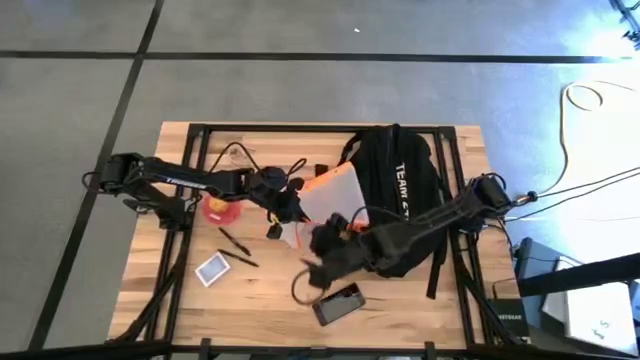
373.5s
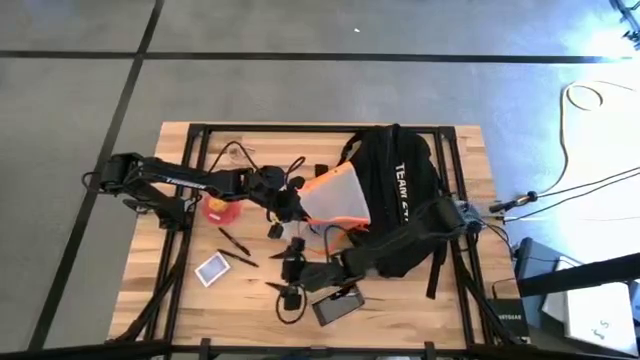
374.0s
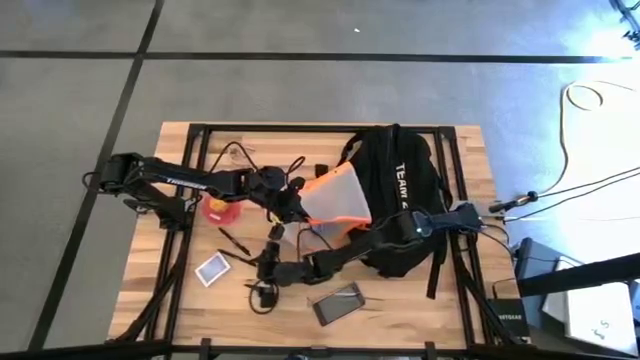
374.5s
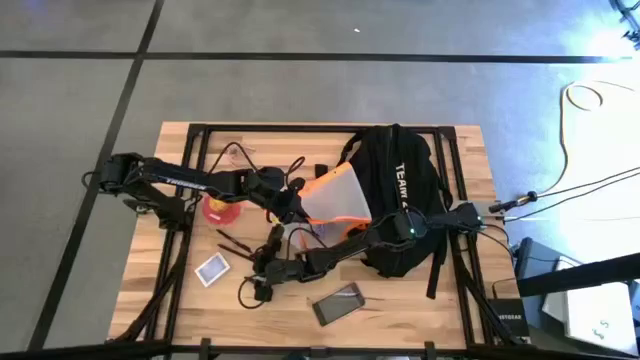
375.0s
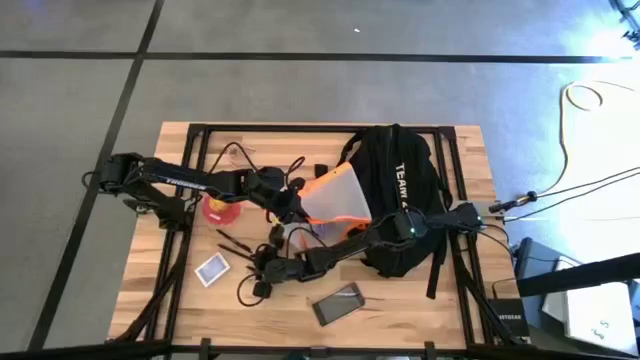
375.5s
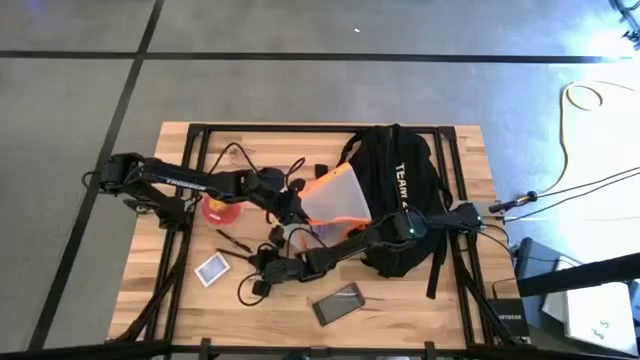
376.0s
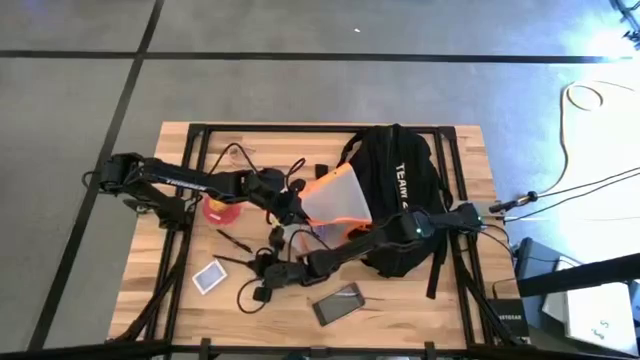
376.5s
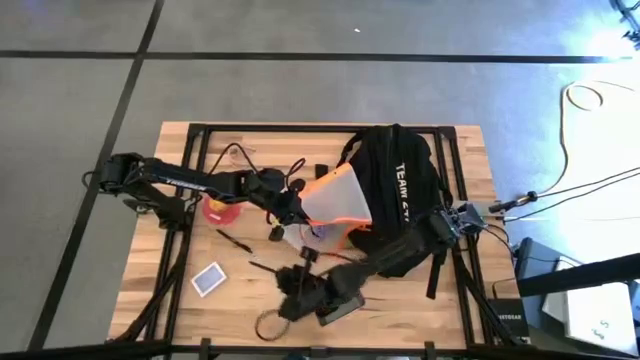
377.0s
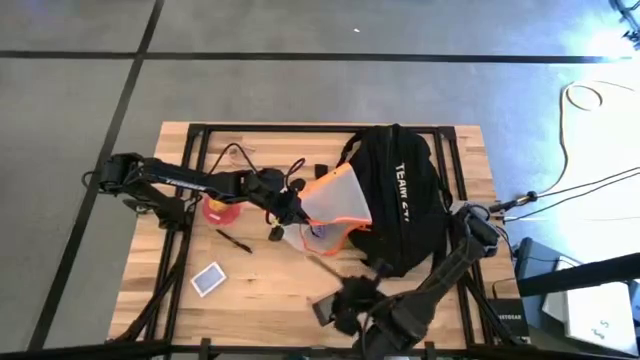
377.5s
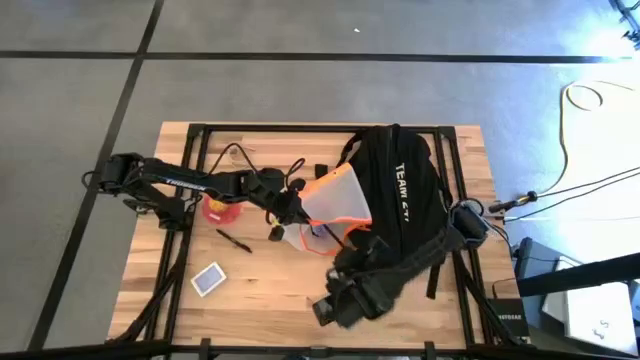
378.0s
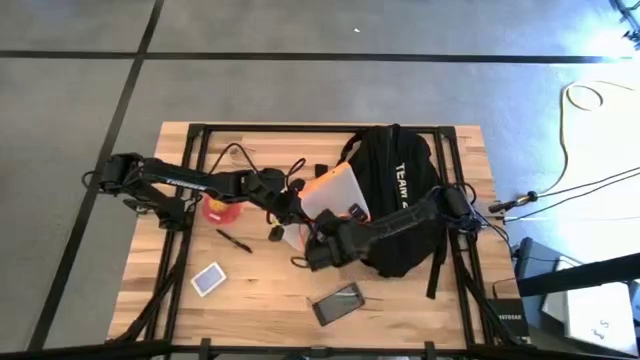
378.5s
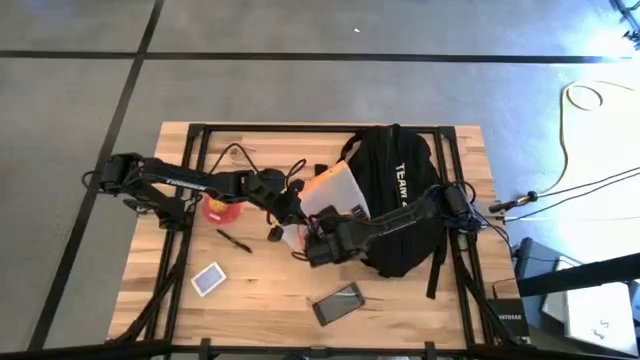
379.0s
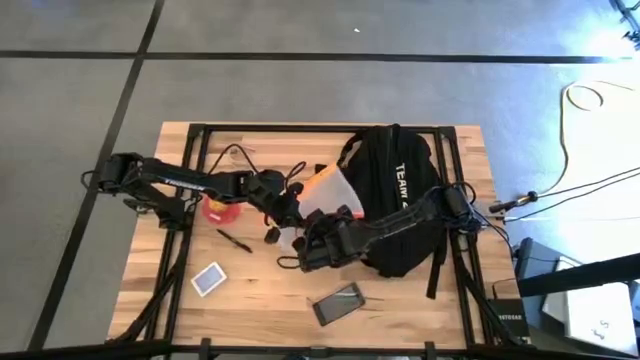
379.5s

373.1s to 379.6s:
Task: Unpack backpack
Put the bottom black pen into the transparent white zip bag

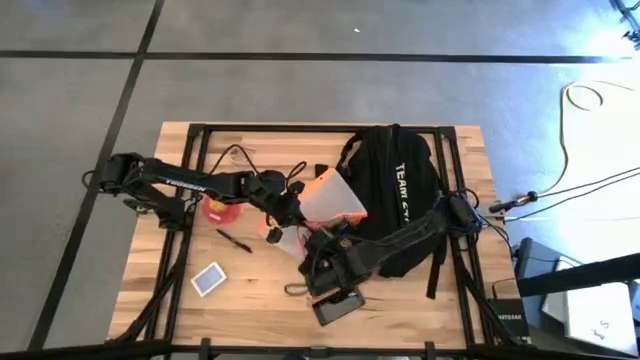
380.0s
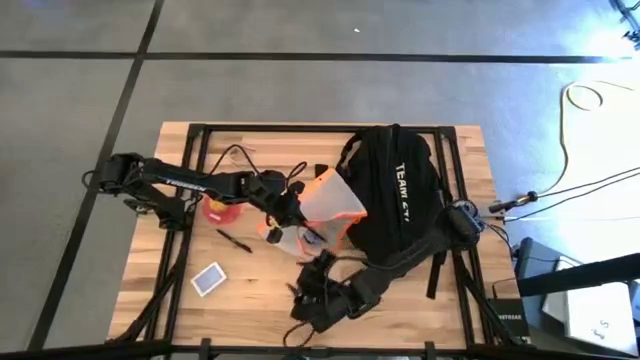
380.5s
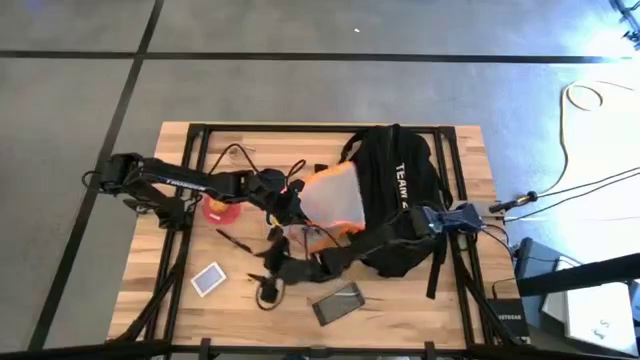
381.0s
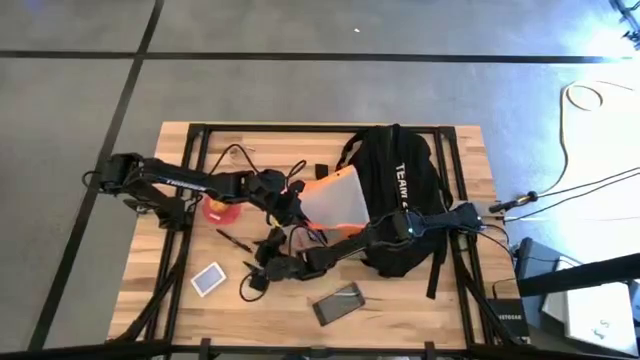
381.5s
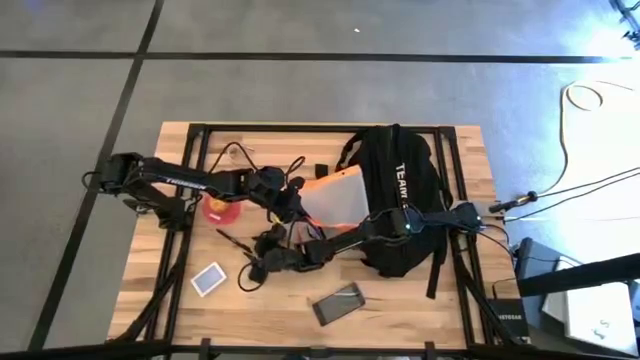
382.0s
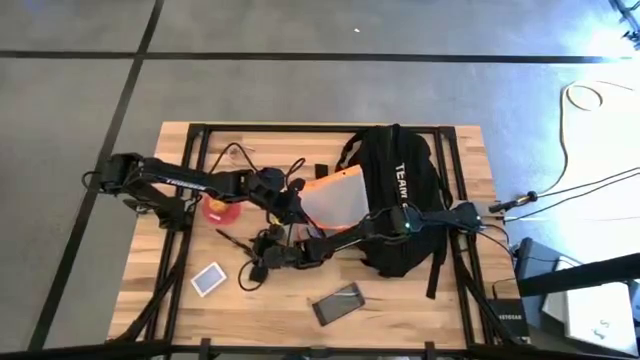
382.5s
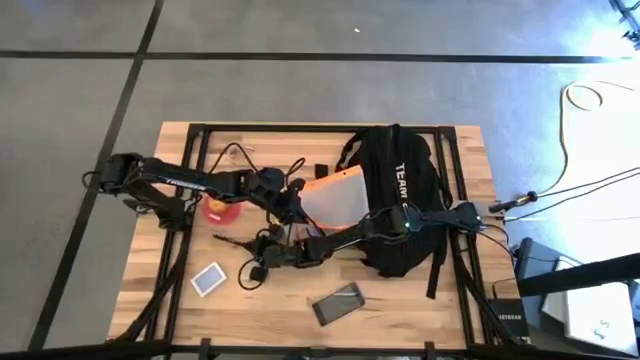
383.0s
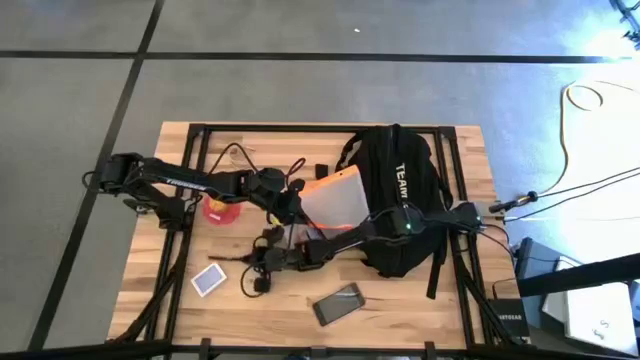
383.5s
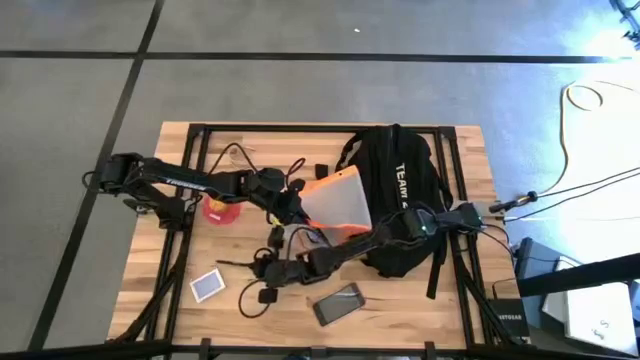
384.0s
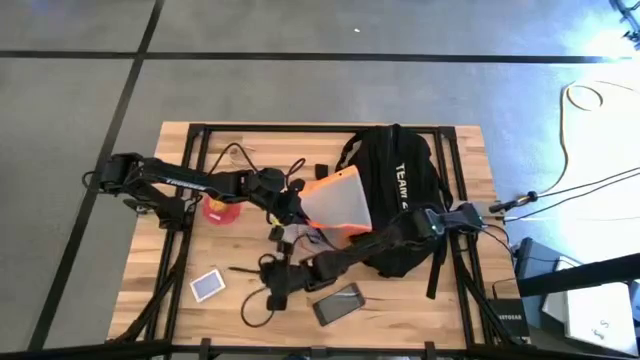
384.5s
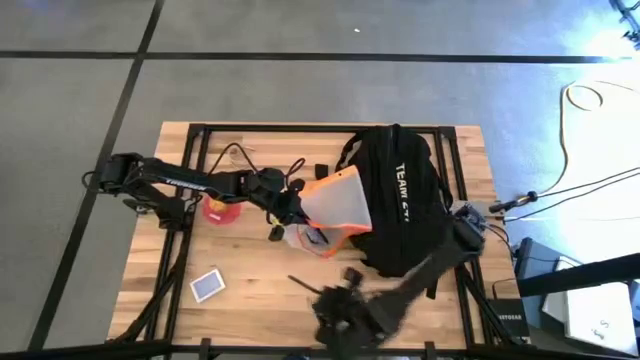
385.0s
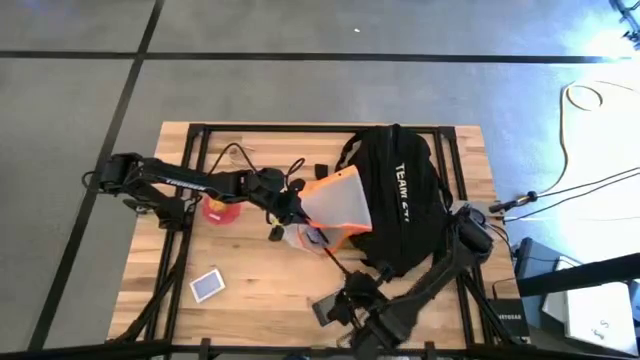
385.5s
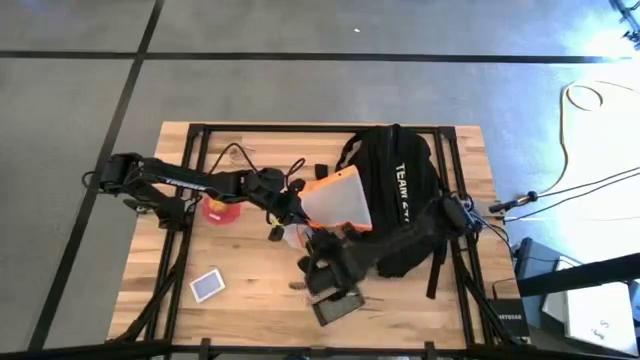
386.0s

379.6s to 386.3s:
Put the black pen into the transparent white zip bag

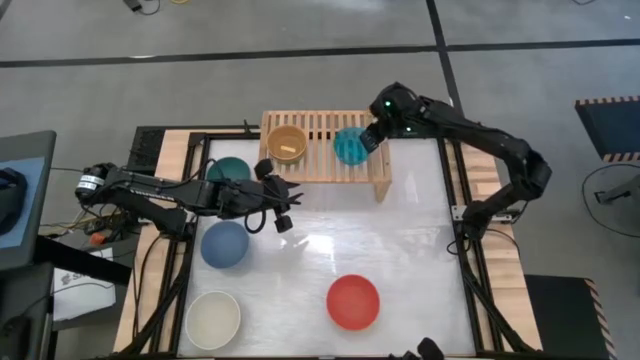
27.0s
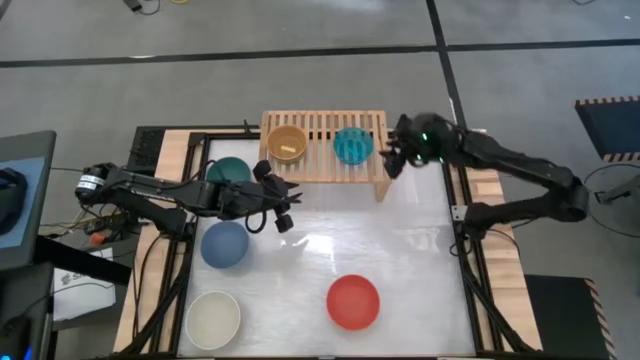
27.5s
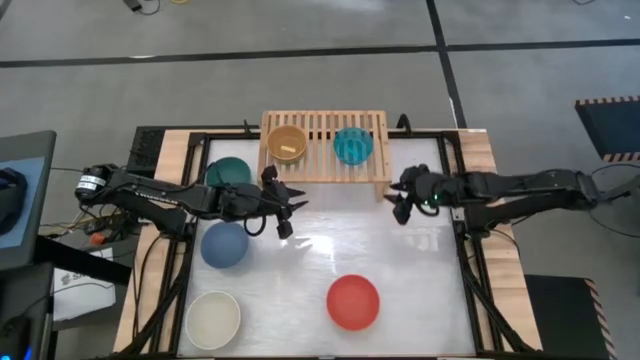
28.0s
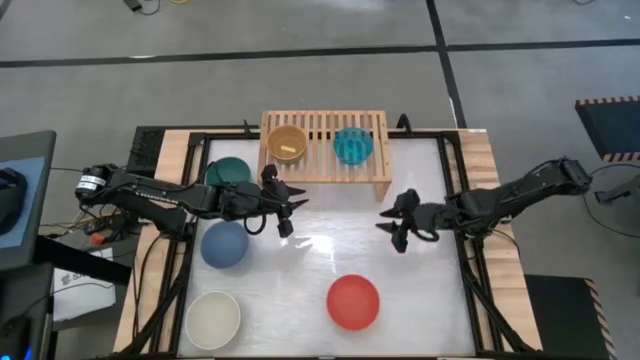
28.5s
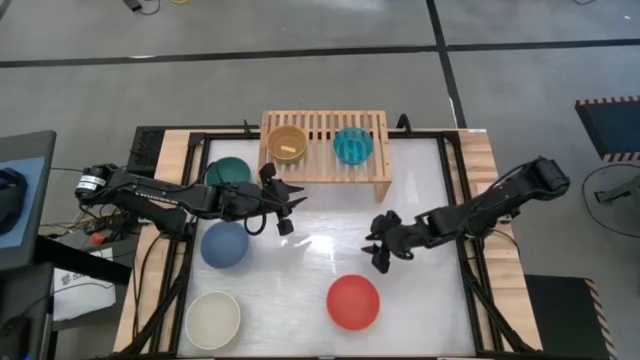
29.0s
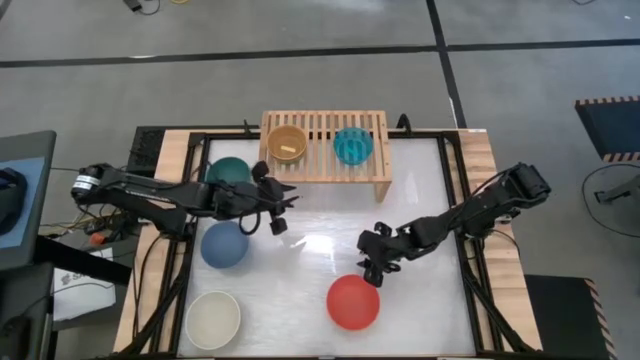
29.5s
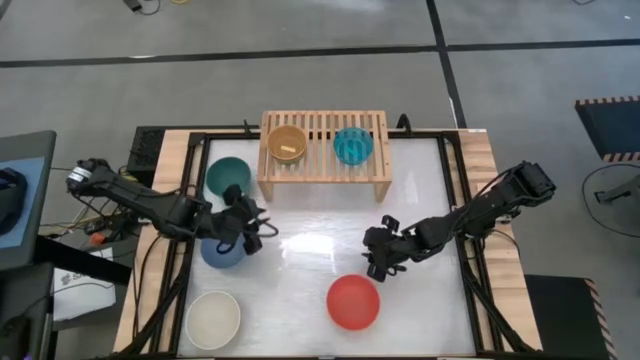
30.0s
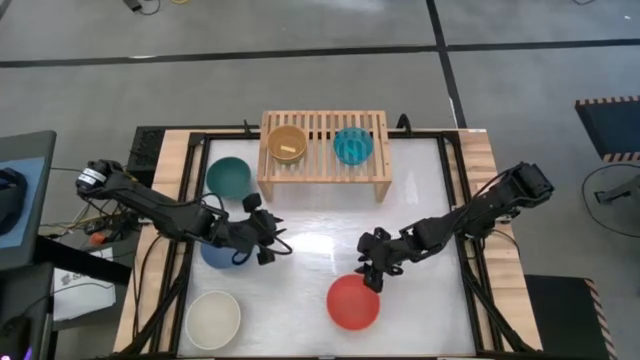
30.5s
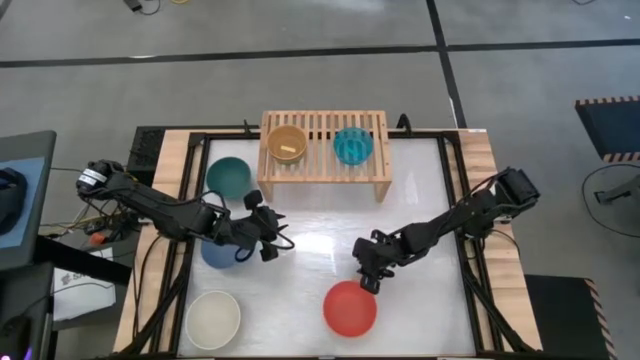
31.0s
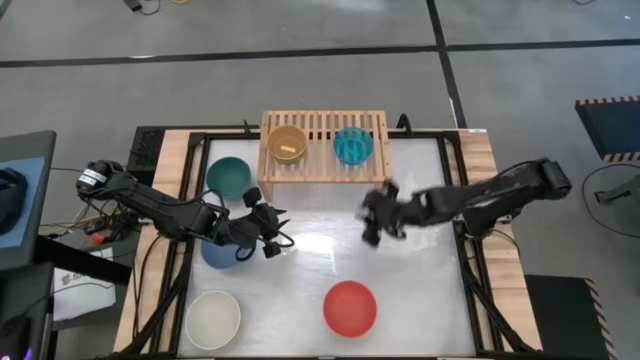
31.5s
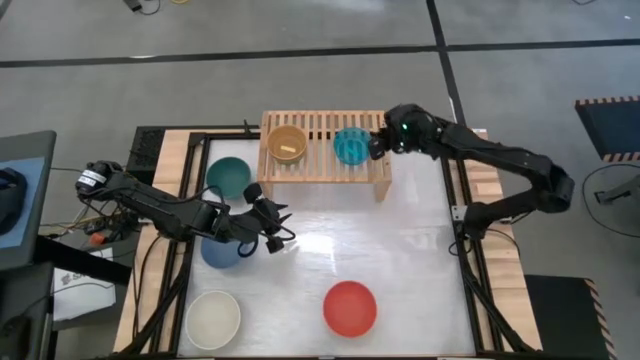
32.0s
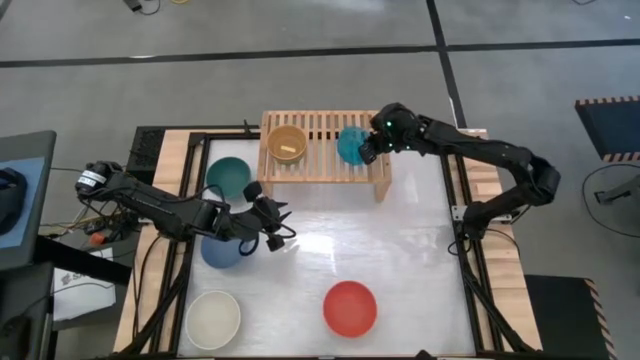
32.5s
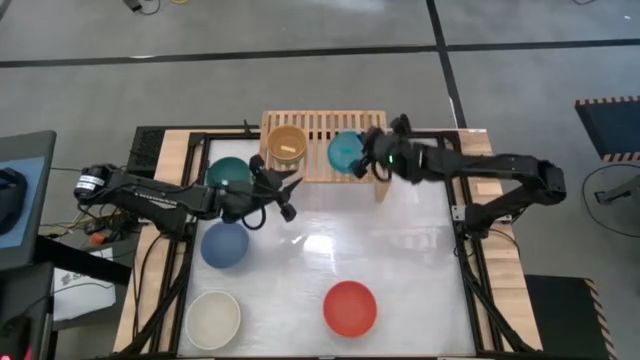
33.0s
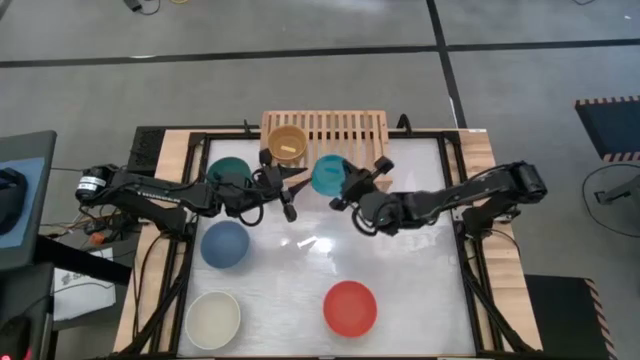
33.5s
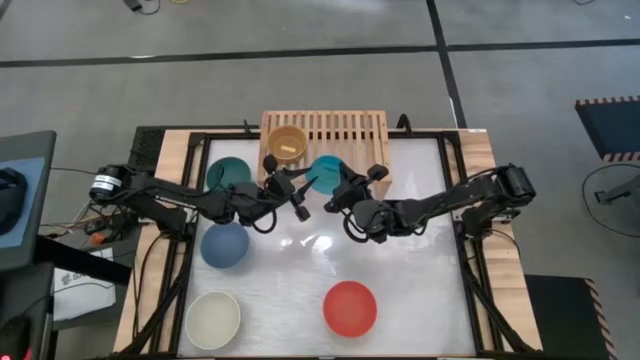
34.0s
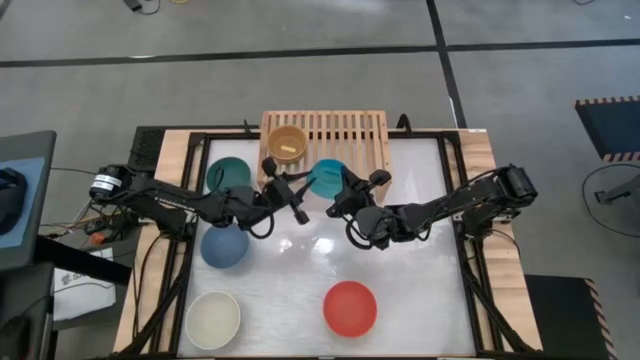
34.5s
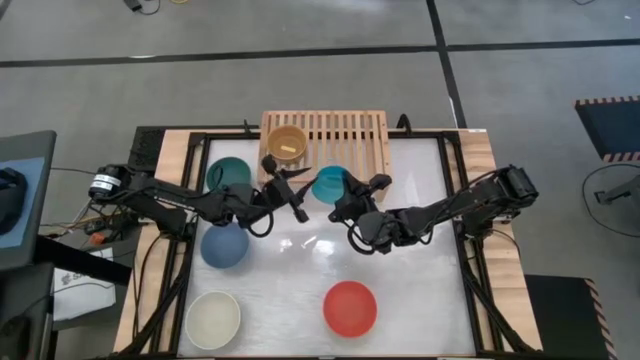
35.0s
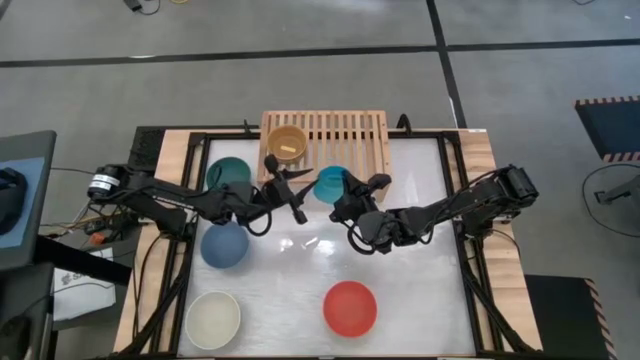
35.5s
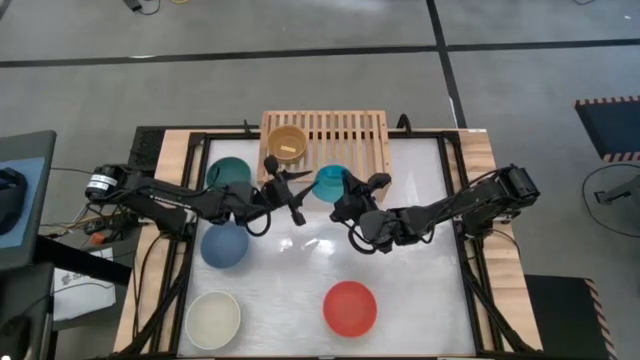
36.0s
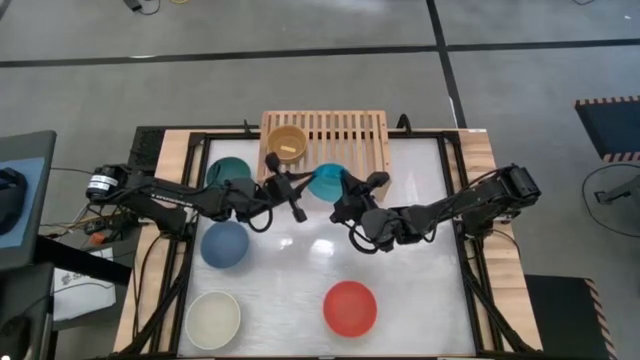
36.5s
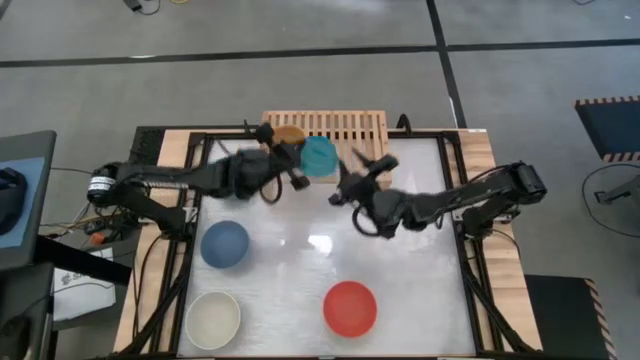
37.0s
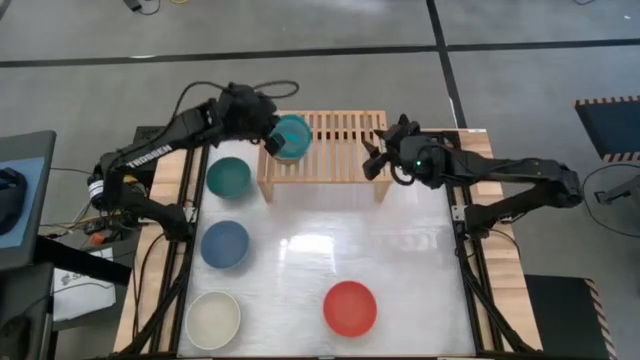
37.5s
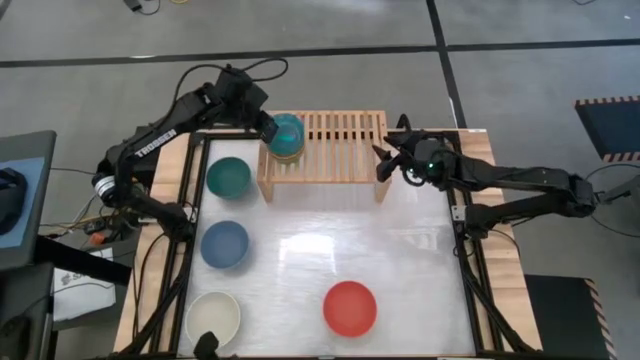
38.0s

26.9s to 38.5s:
Task: Place and stack bowls onto a shelf
Stack the transparent blue bowl on top of the transparent yellow bowl
